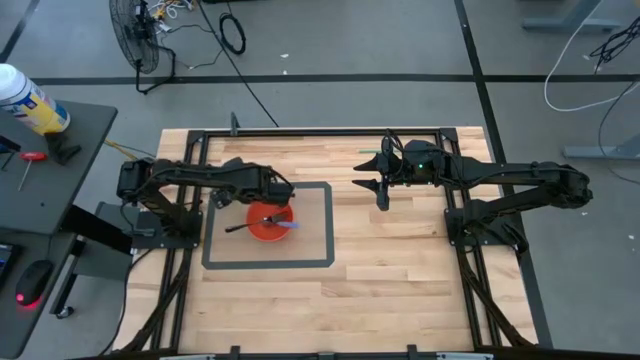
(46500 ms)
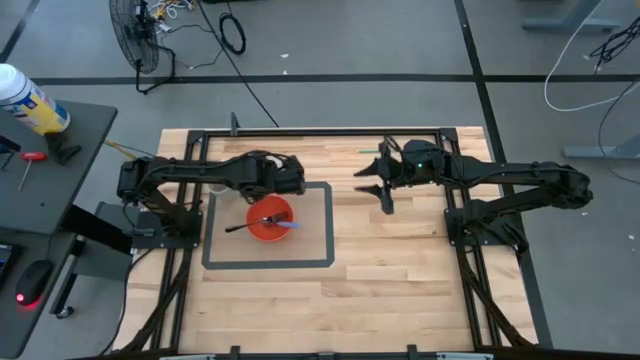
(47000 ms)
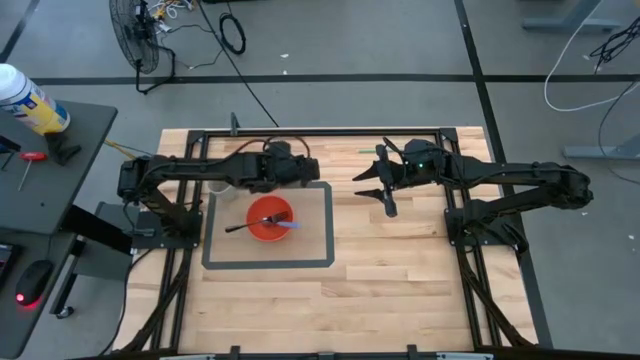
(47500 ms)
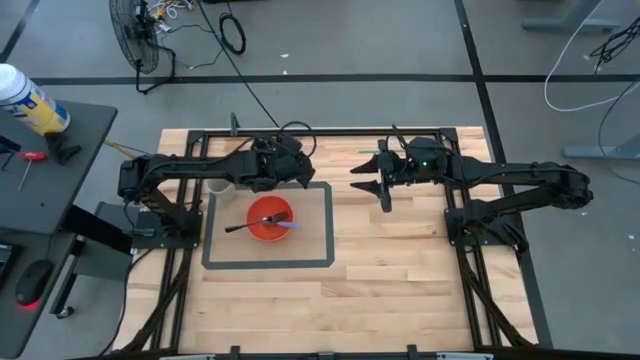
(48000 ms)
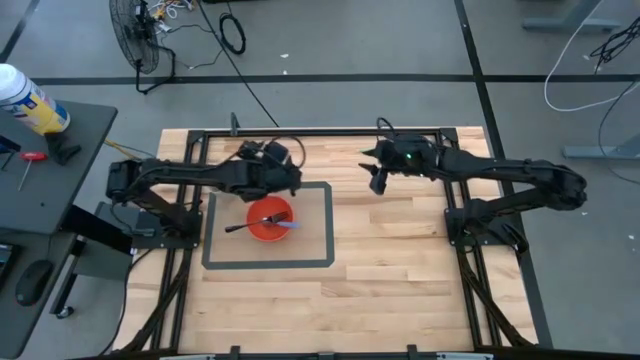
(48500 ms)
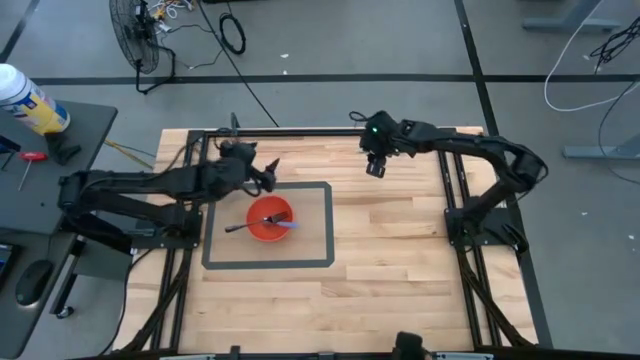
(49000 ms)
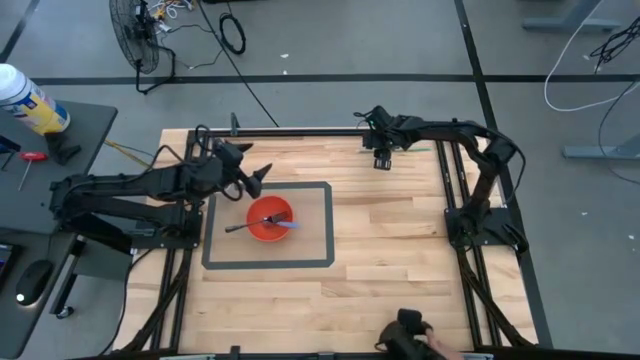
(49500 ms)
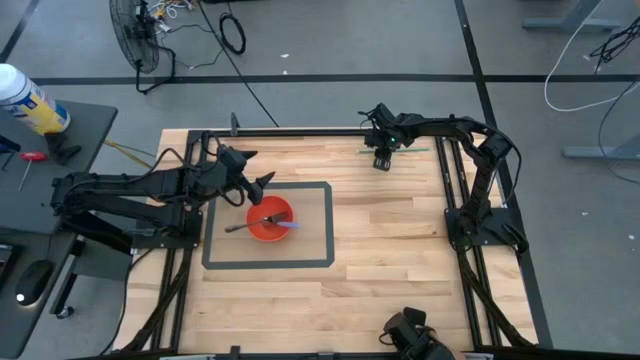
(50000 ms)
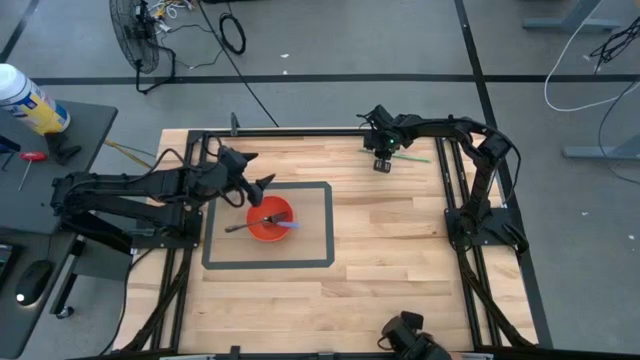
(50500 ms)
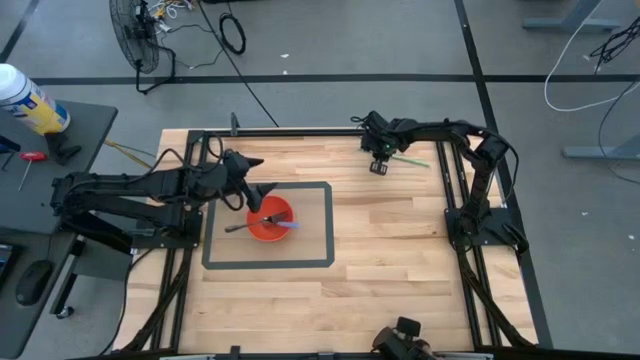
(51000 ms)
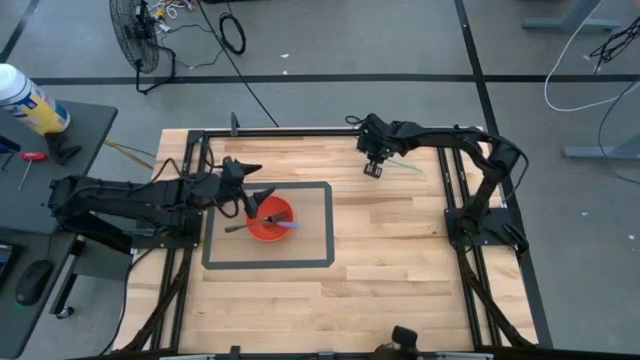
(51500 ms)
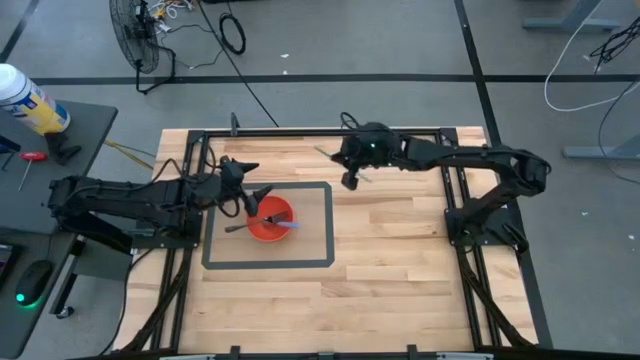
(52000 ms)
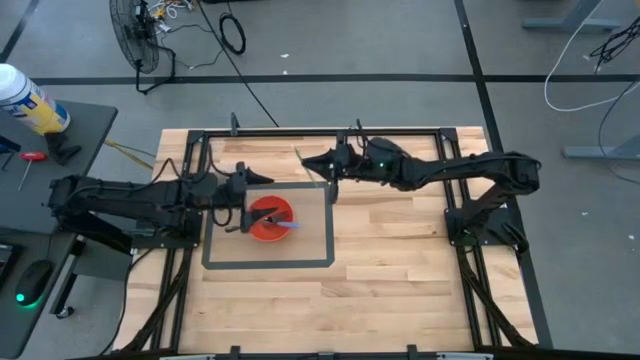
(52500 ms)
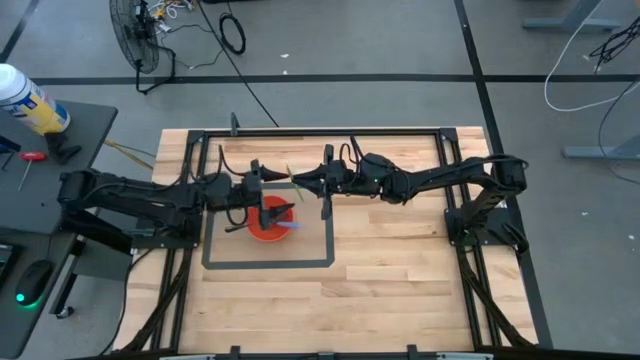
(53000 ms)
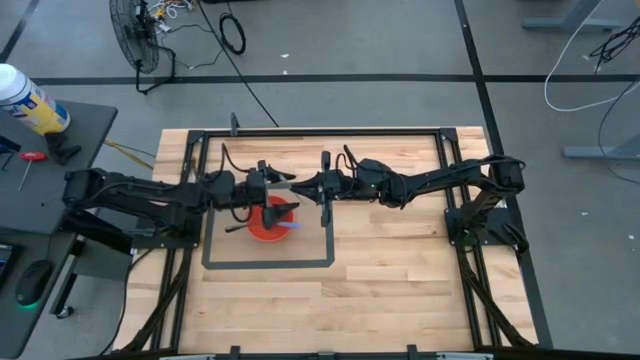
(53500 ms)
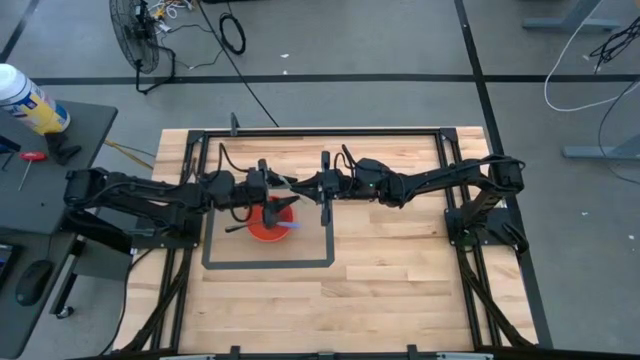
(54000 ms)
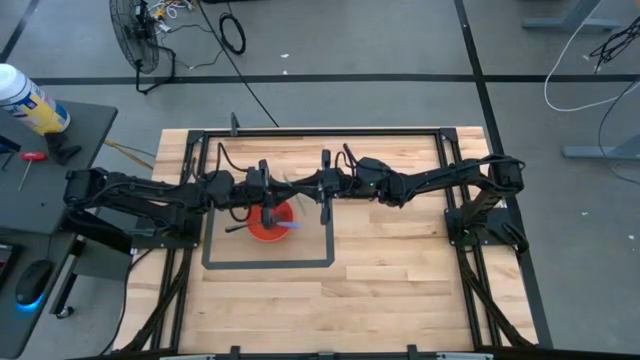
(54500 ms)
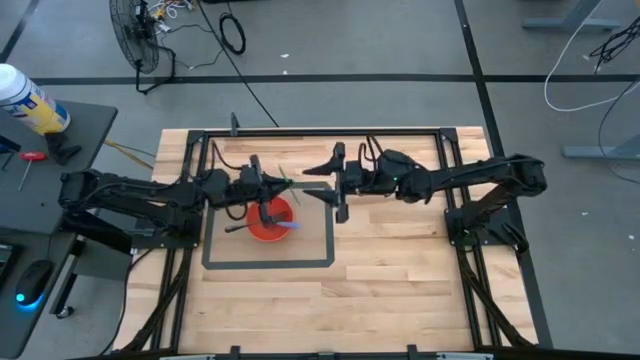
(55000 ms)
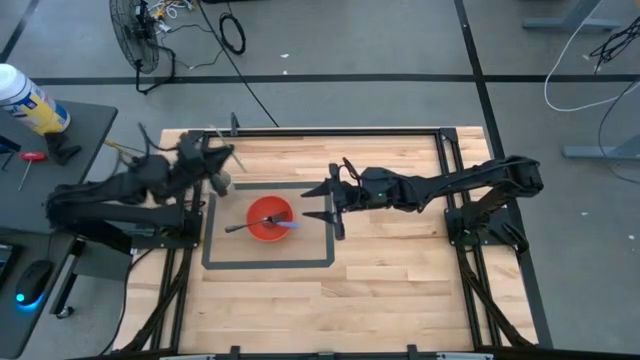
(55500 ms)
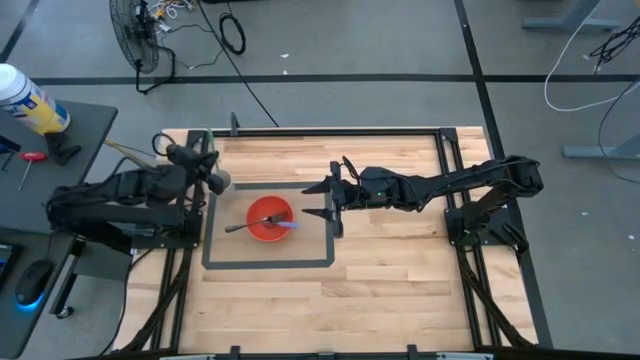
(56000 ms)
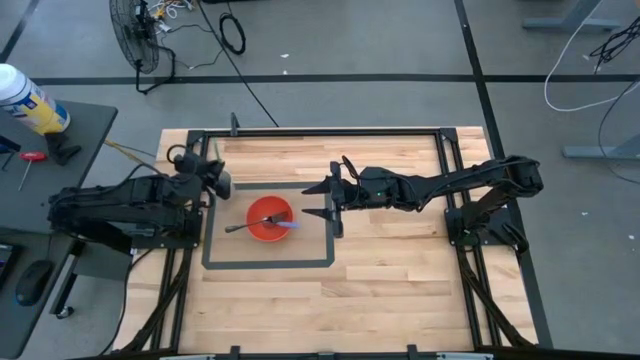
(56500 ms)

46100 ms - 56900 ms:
Task: Pick & Place Utensil
Put the green straw into the gray cup

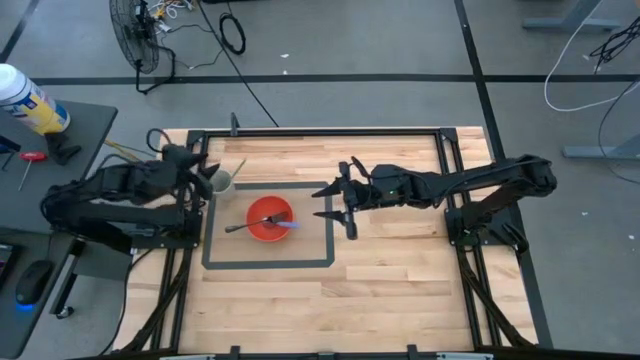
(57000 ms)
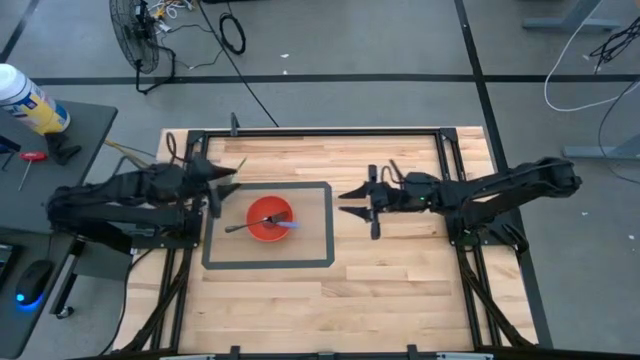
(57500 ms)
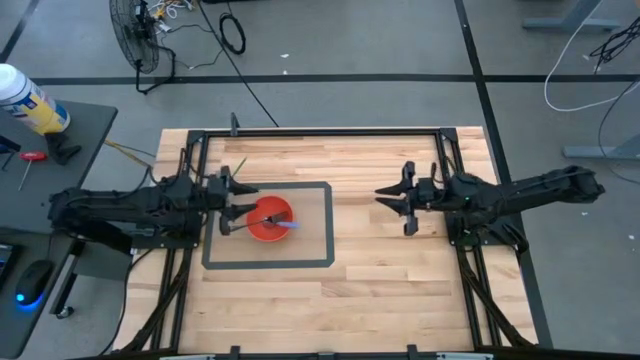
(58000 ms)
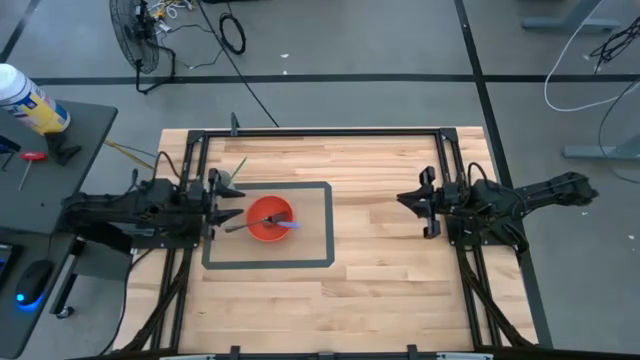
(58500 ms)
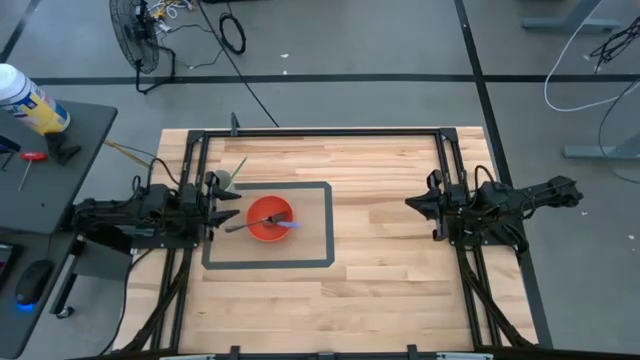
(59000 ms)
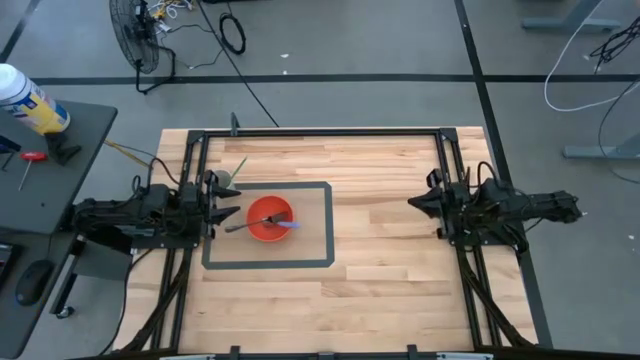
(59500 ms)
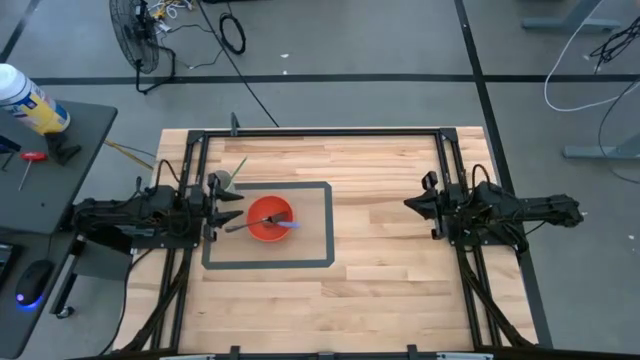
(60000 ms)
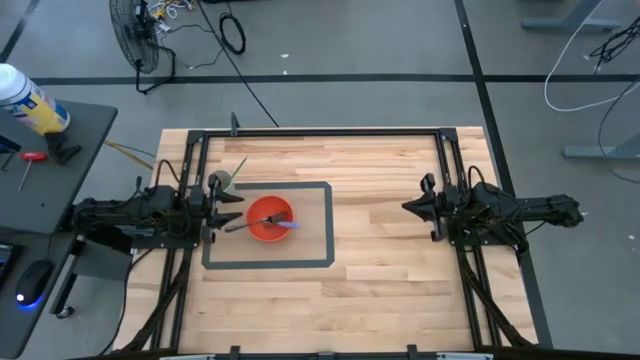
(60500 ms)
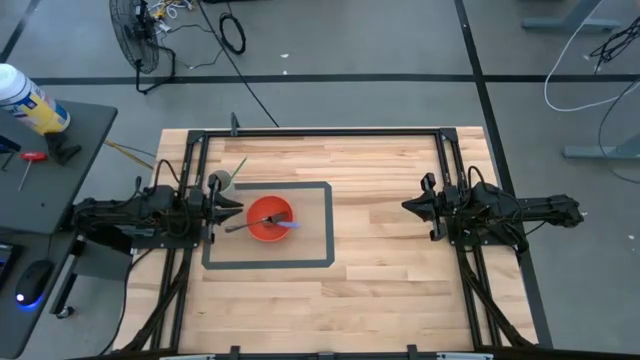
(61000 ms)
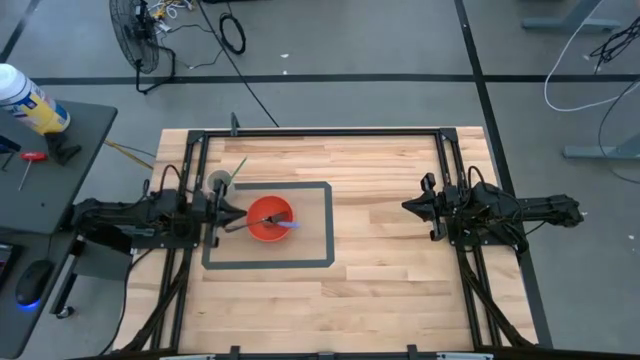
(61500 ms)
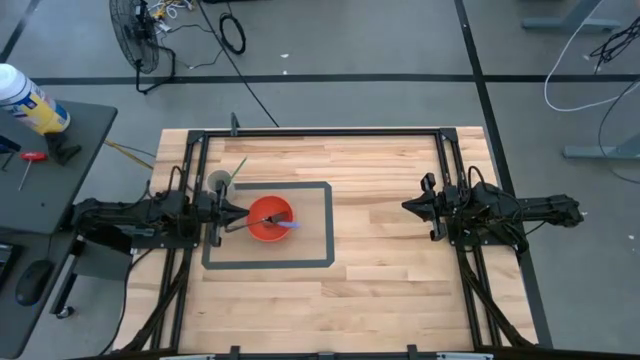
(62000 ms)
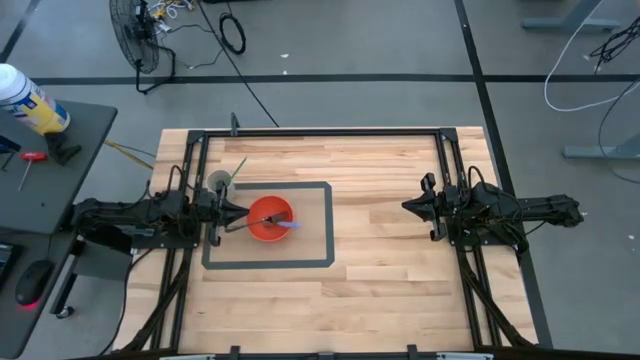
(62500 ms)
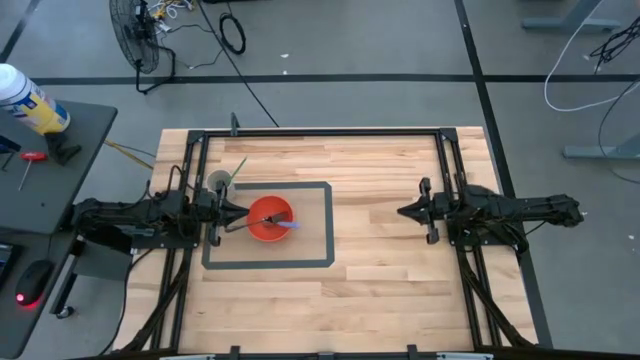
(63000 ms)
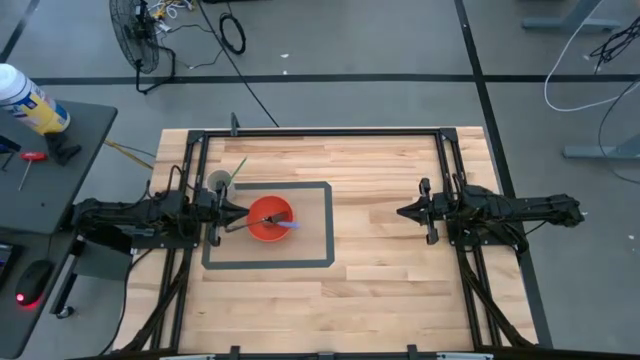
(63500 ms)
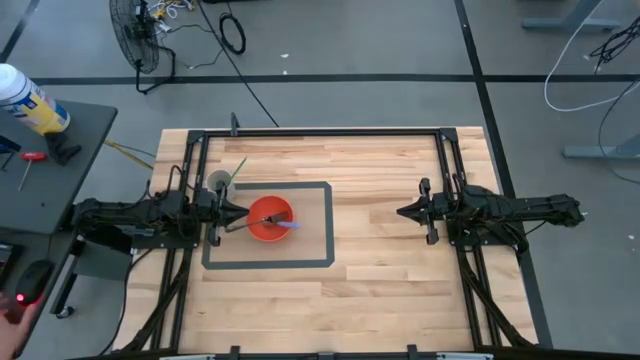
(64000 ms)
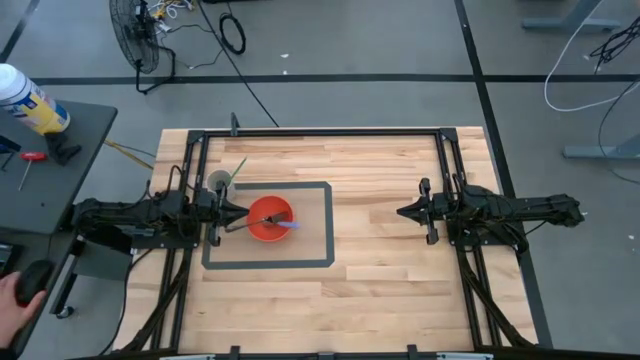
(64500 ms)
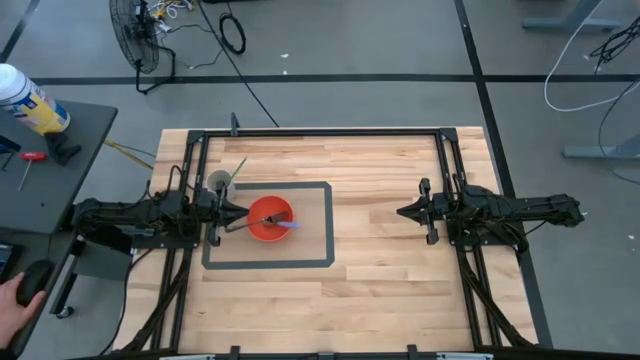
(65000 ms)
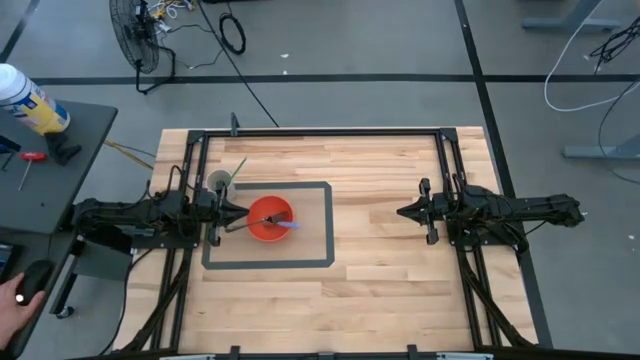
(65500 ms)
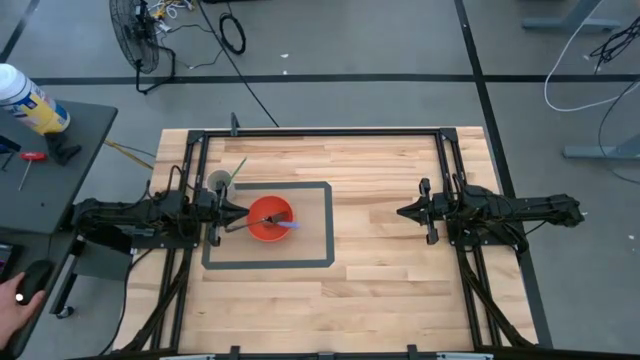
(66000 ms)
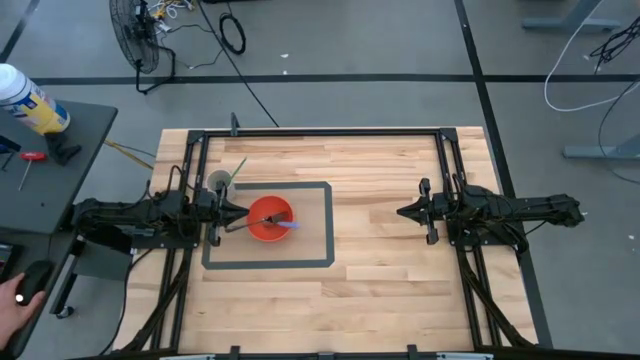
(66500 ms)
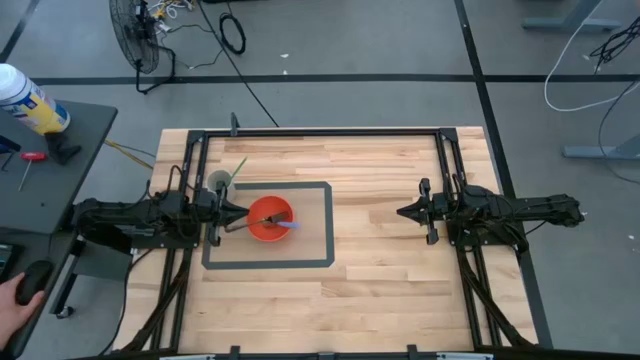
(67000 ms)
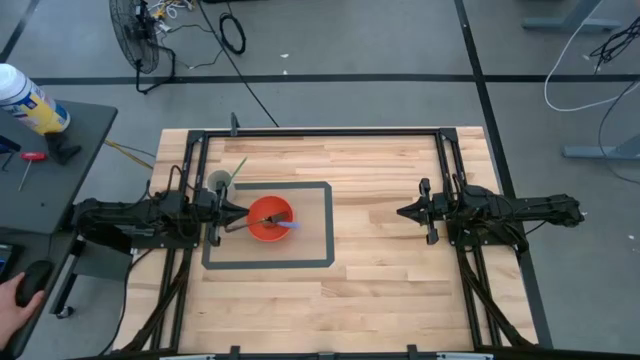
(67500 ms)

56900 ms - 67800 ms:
Return to Home Position

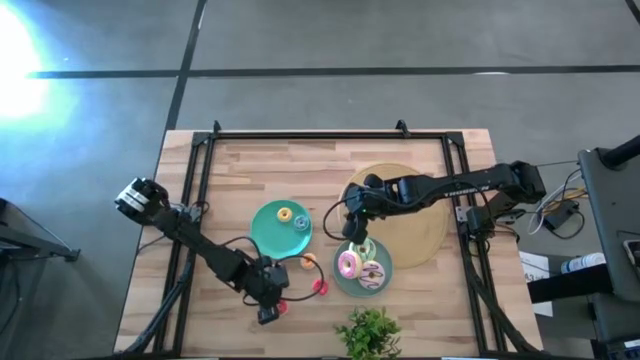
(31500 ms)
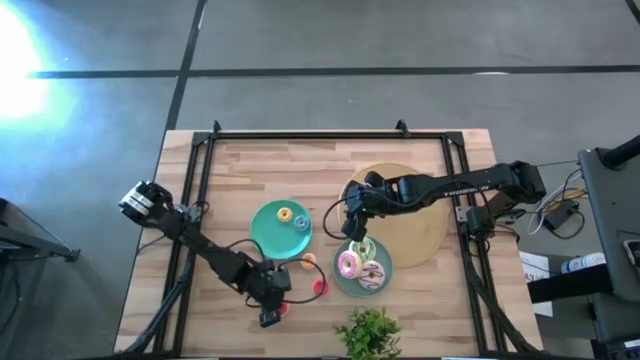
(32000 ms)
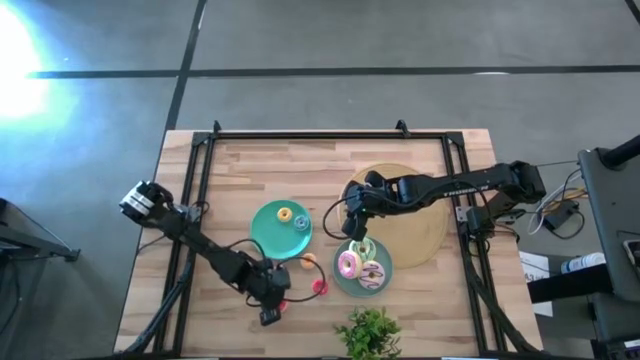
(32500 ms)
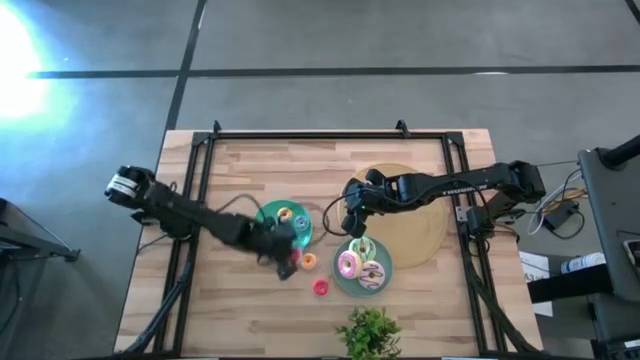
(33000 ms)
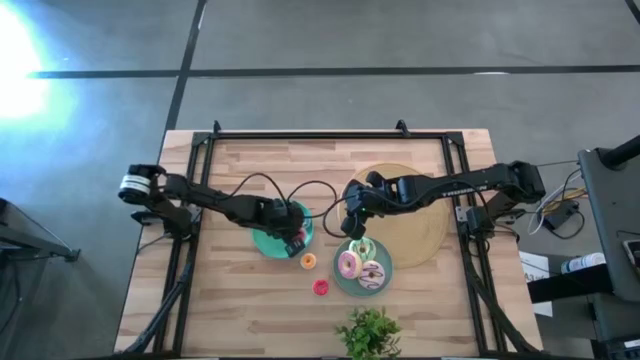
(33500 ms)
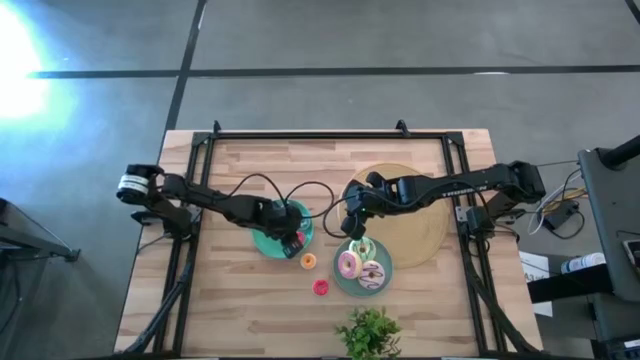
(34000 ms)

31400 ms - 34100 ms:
Task: Pick & Place donuts
Put the small orange donut on the green plate
